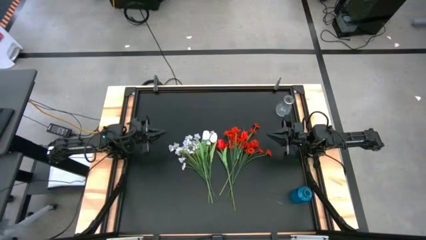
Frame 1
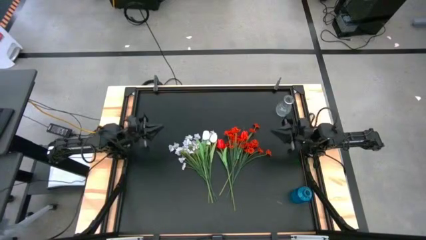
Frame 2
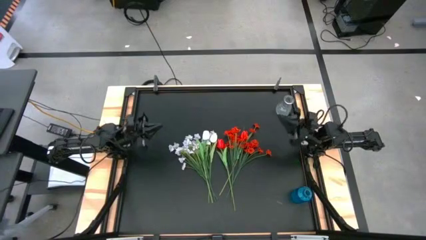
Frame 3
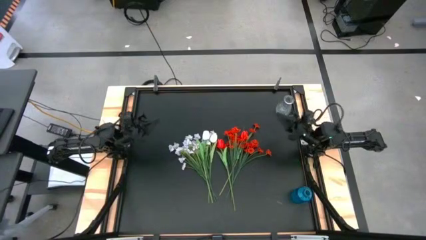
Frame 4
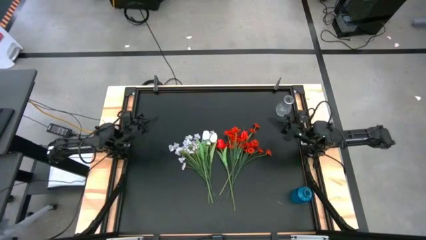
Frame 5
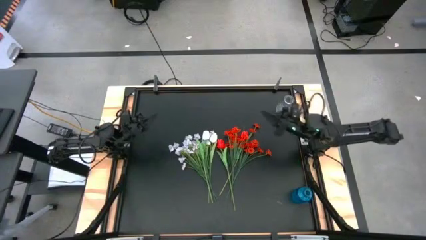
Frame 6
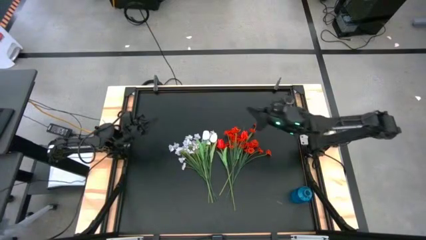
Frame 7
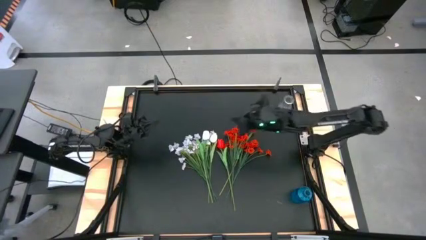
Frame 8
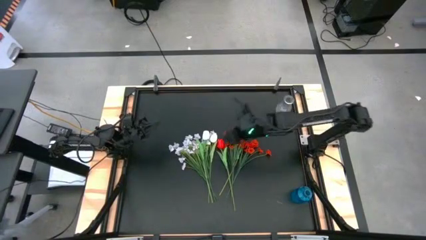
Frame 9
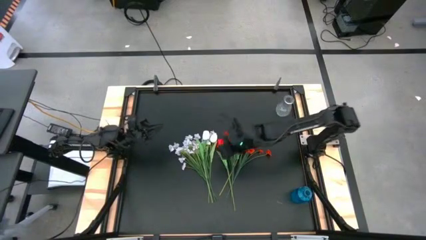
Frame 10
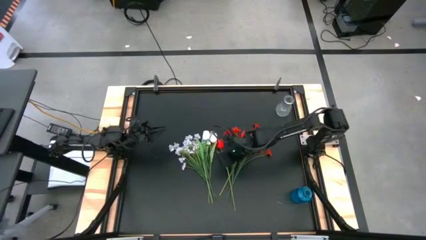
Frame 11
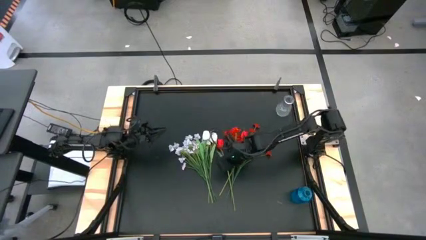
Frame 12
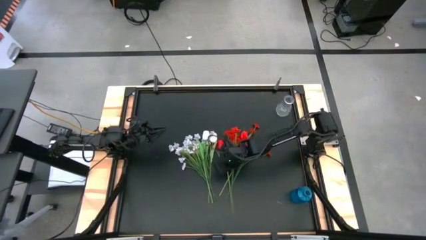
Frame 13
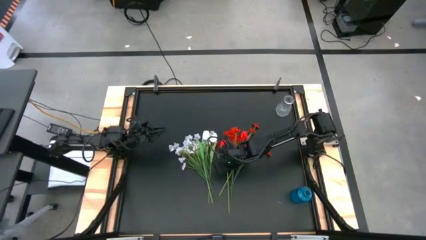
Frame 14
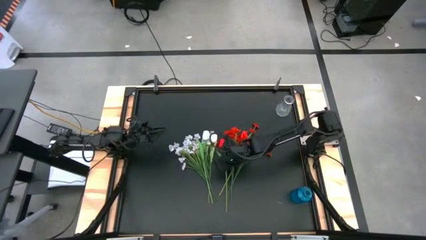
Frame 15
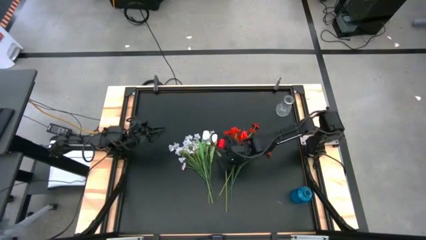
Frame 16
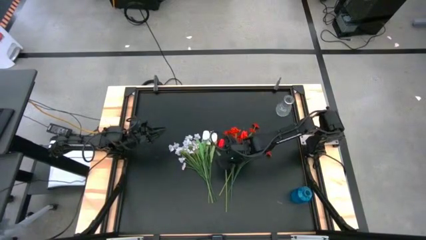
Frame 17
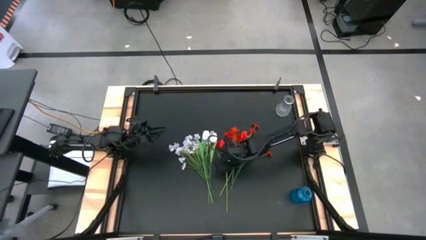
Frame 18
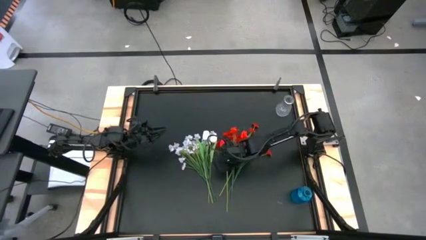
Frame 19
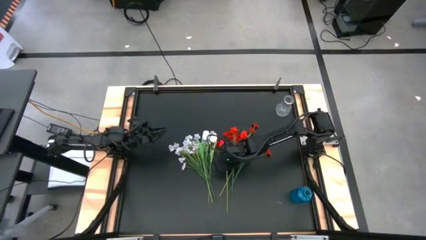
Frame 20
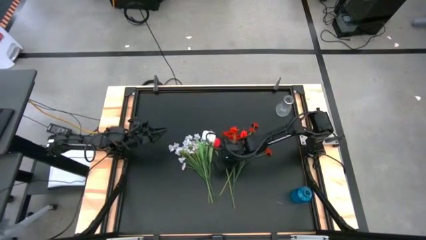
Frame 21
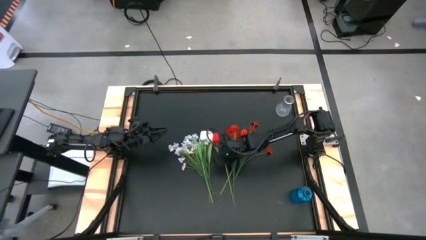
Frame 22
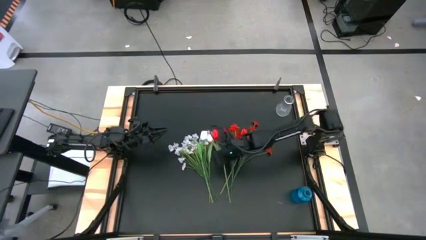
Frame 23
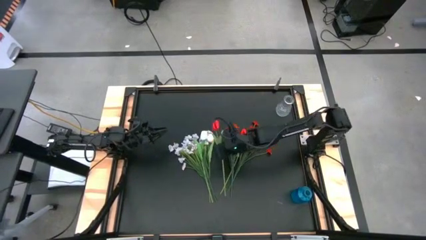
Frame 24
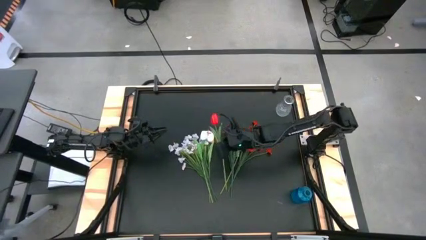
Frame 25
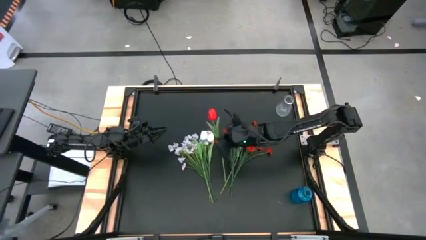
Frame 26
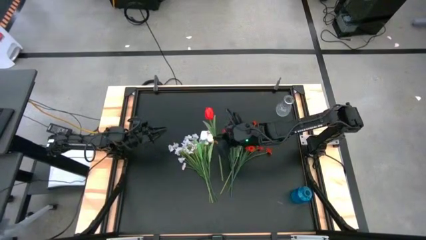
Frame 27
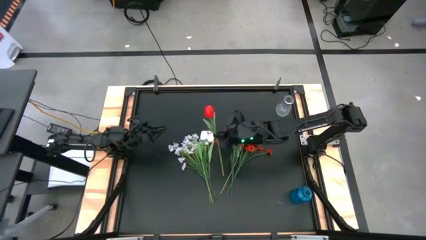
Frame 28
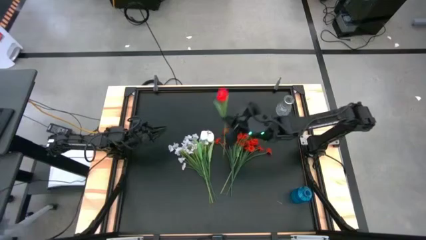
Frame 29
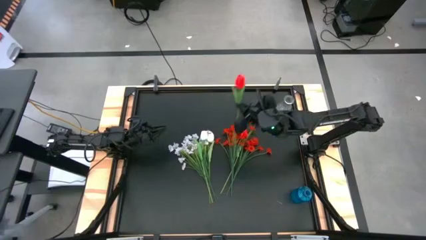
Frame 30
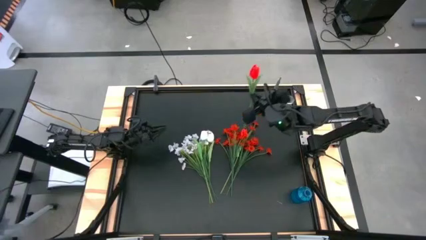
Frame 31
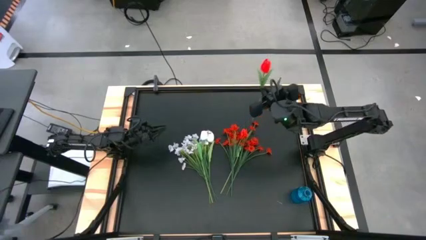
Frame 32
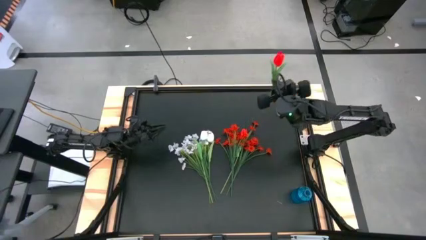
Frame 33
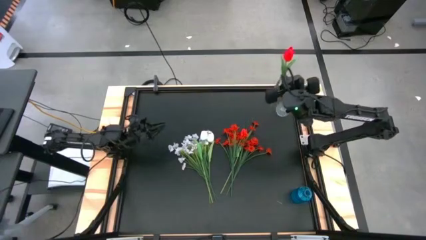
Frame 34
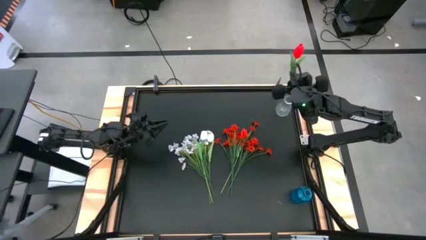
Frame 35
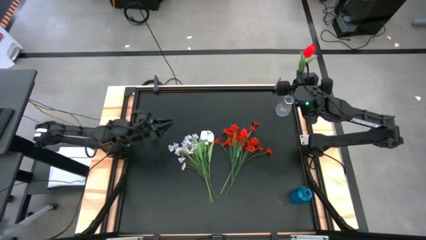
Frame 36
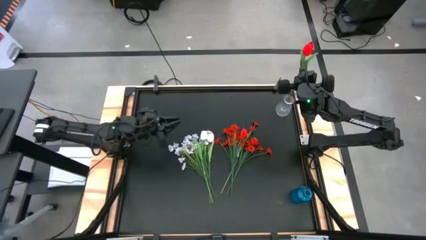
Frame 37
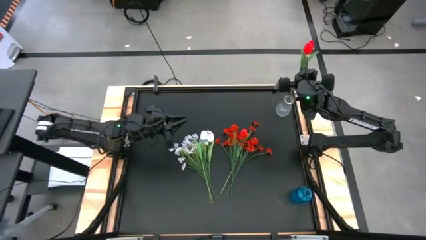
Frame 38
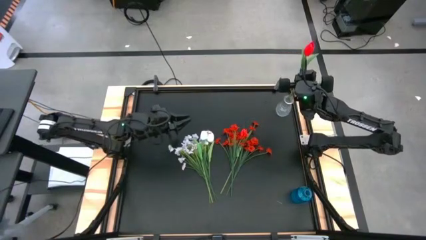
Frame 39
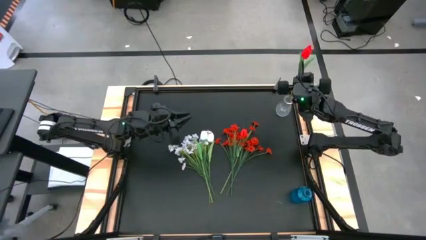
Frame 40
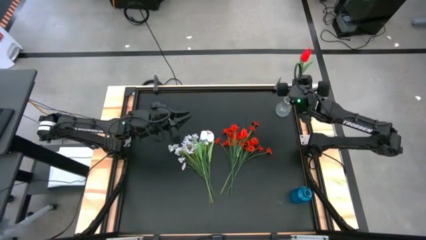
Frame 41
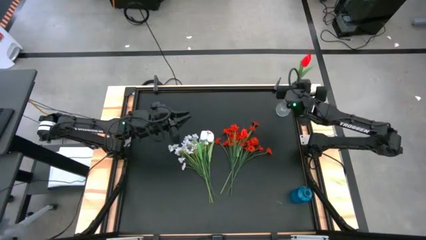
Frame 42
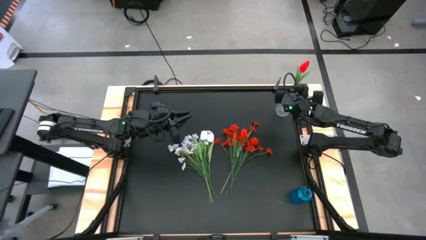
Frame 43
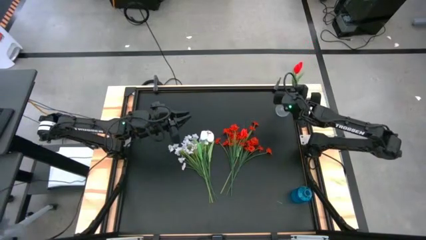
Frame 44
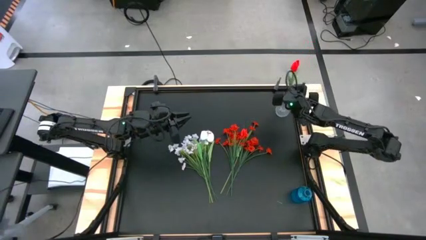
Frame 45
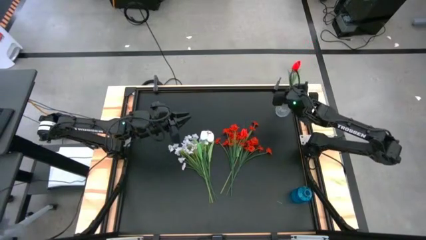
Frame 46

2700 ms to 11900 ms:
Task: Sort flowers into vase by color
Put the left red flower into the transparent vase

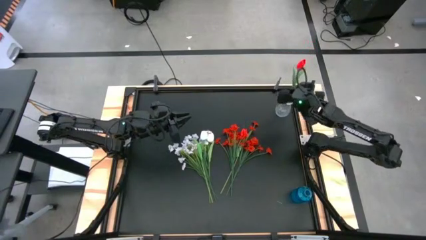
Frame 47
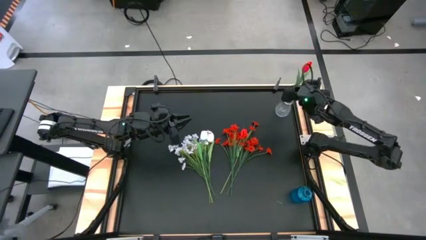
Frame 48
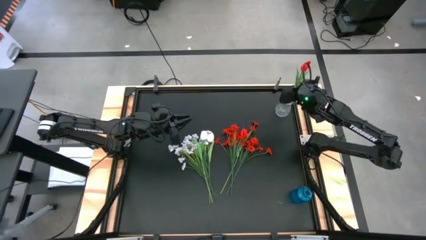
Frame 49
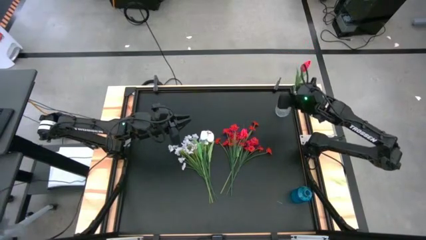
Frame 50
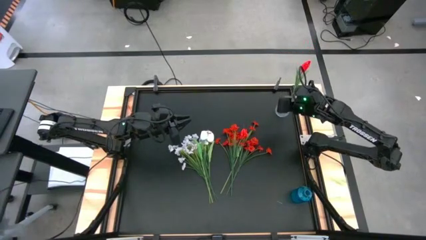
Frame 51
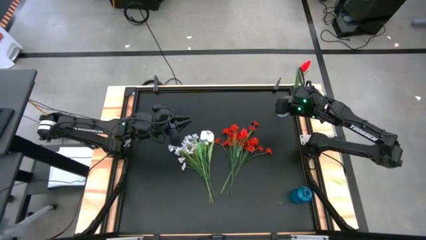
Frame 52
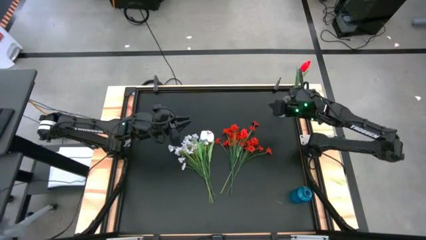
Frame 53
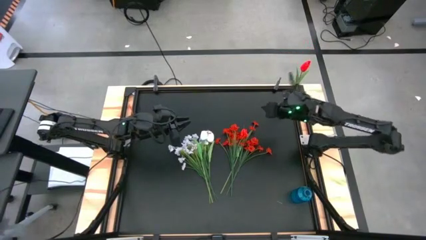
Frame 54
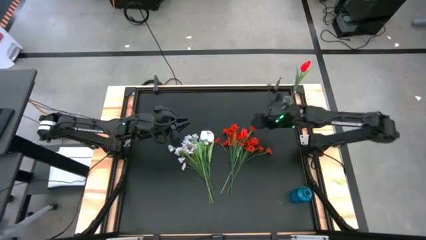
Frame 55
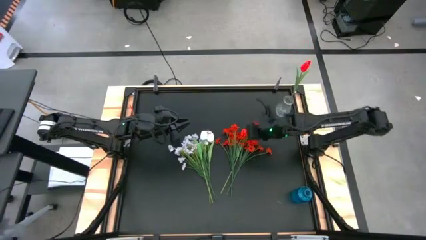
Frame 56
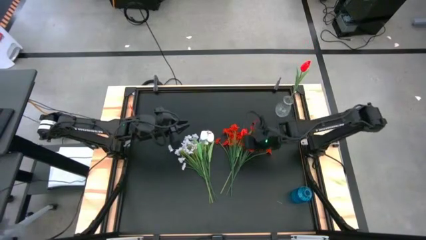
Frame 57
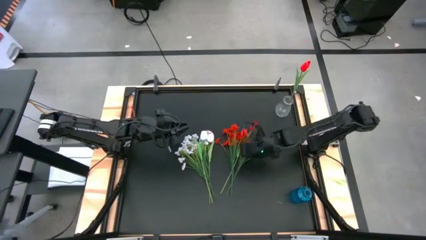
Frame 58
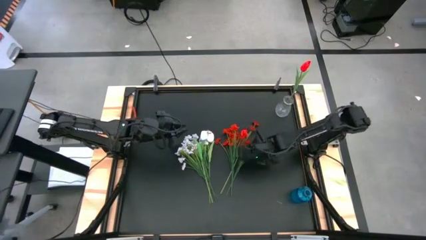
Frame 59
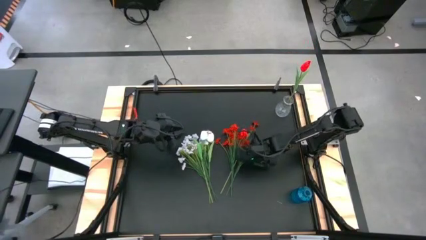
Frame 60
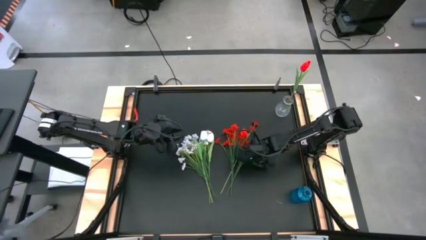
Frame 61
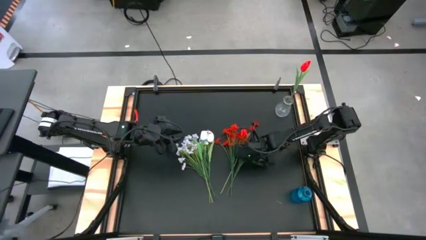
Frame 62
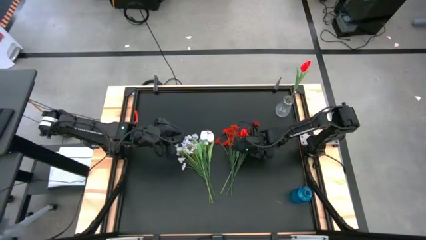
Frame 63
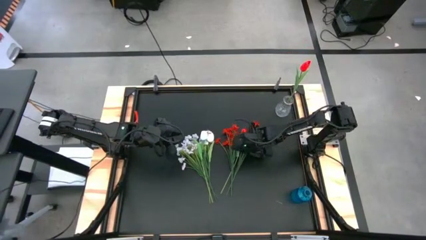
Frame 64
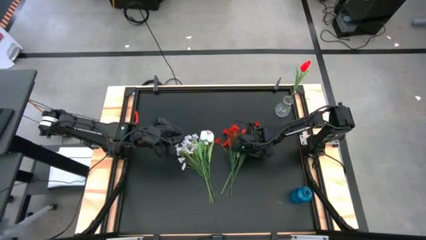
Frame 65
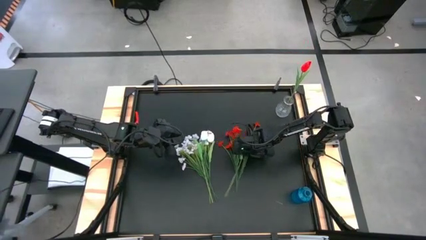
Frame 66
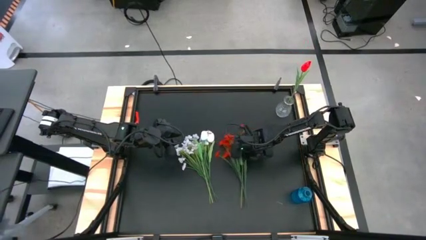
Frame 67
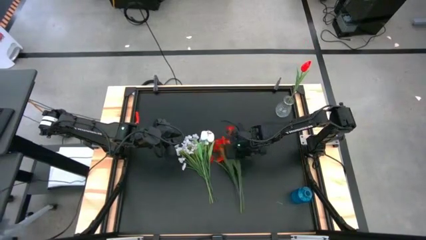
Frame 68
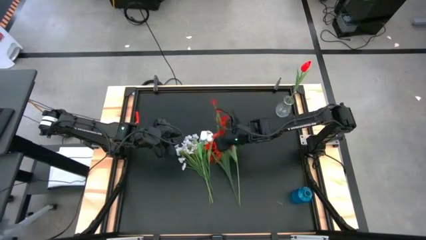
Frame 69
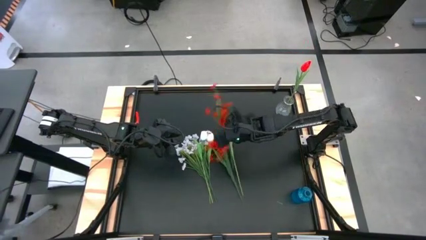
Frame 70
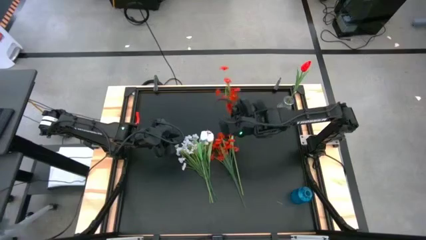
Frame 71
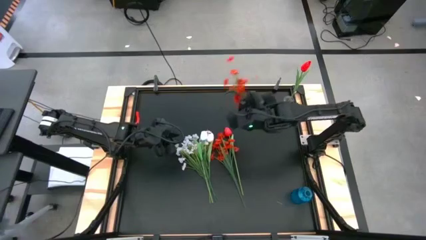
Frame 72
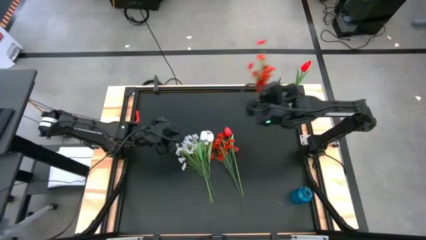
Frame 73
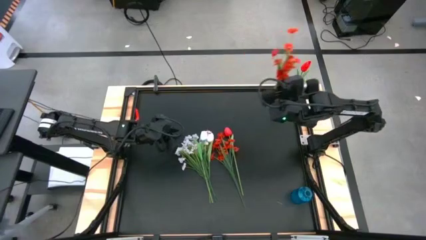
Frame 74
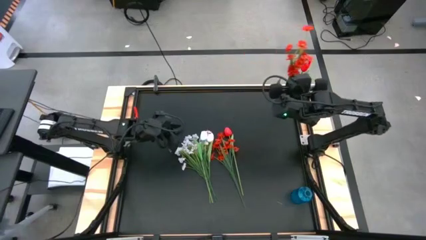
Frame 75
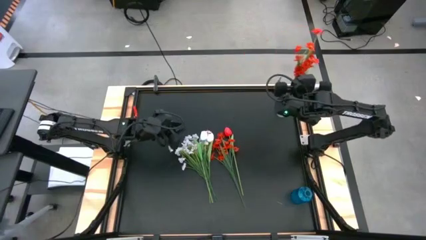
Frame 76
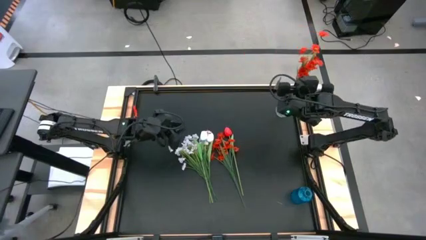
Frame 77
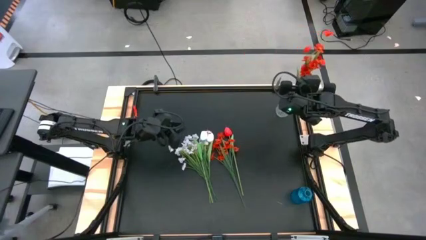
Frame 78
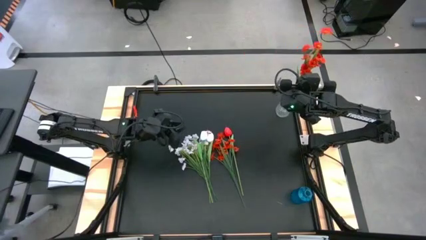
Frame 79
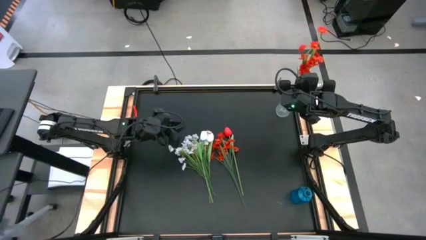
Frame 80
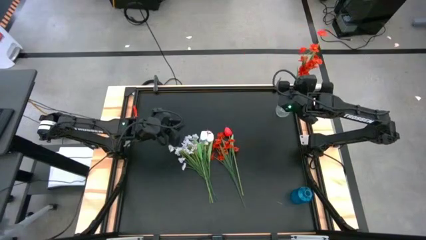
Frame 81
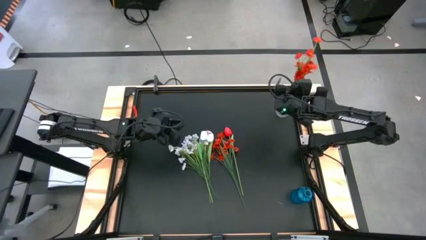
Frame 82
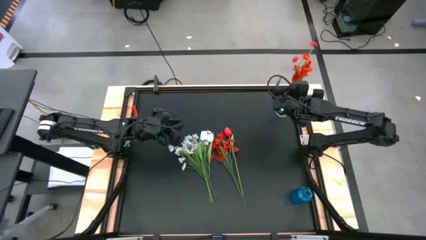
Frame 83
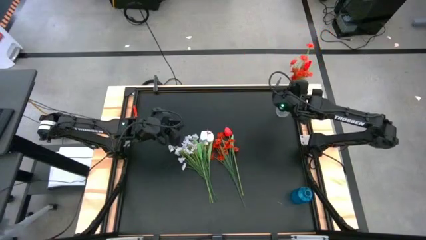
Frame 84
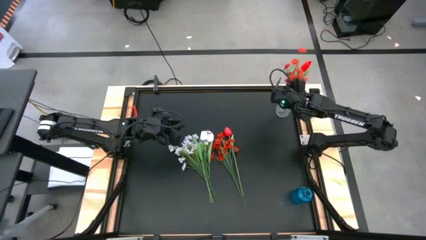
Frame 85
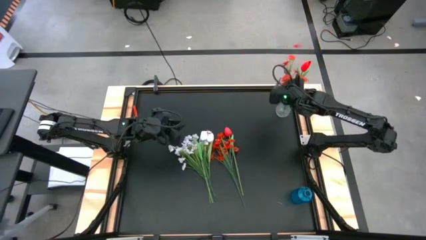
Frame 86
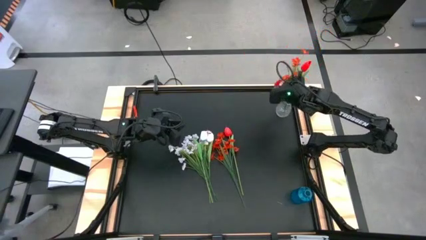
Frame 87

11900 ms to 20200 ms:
Put the right red flowers into the transparent vase
